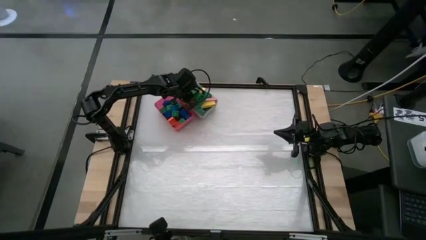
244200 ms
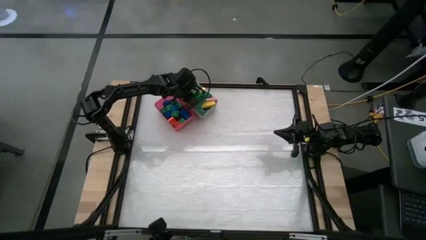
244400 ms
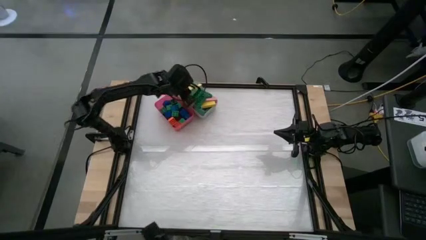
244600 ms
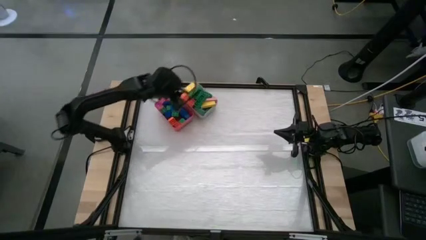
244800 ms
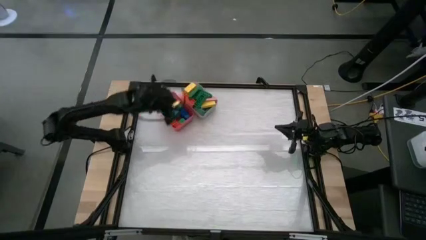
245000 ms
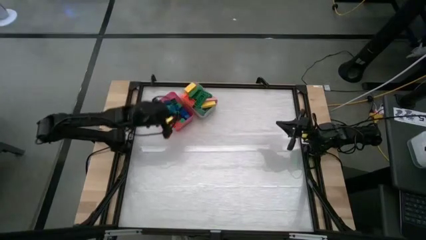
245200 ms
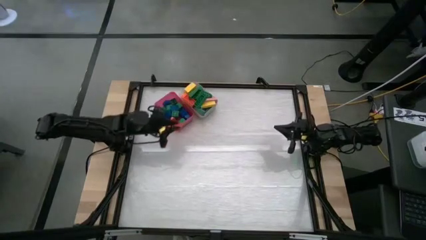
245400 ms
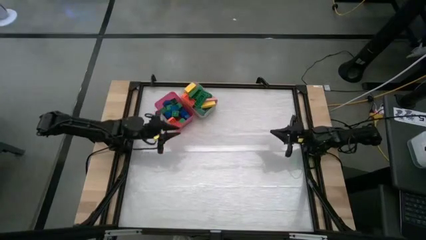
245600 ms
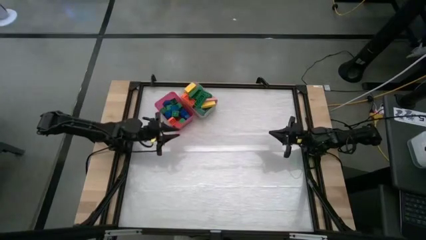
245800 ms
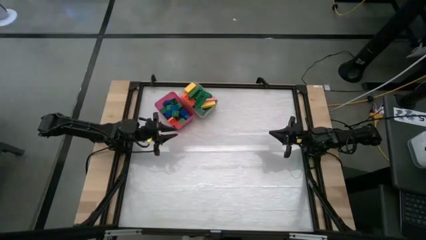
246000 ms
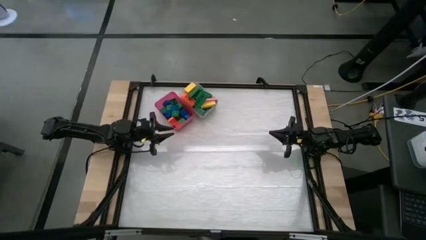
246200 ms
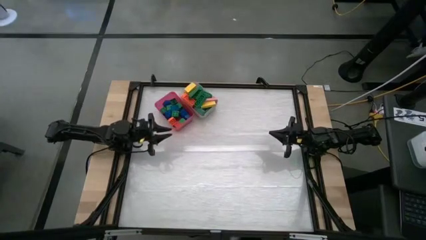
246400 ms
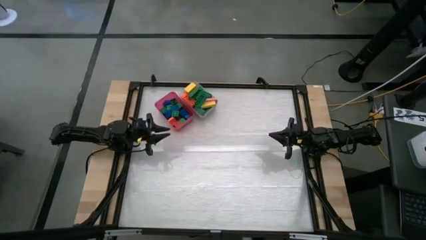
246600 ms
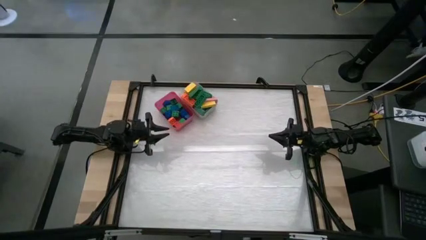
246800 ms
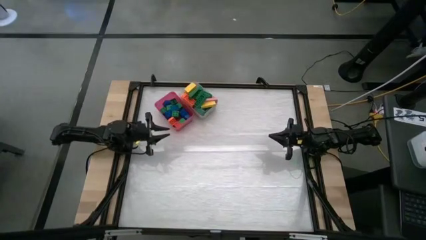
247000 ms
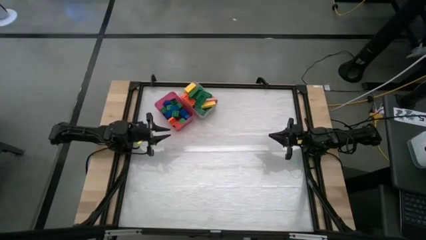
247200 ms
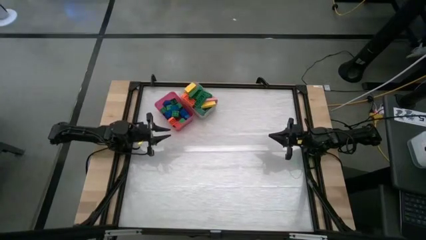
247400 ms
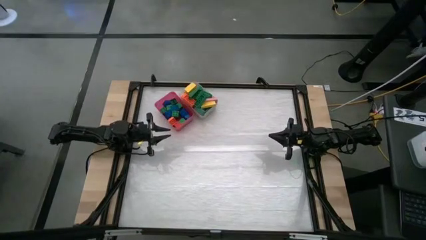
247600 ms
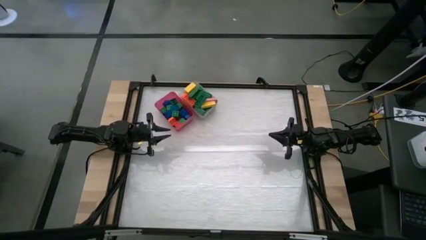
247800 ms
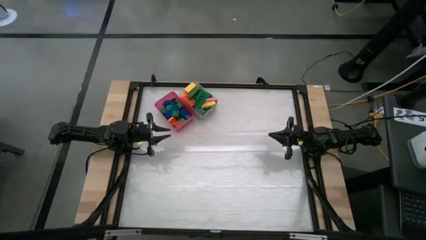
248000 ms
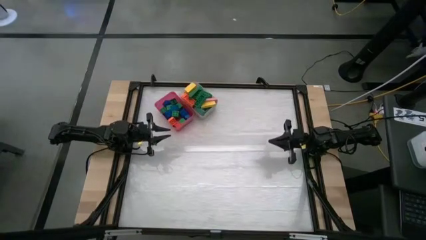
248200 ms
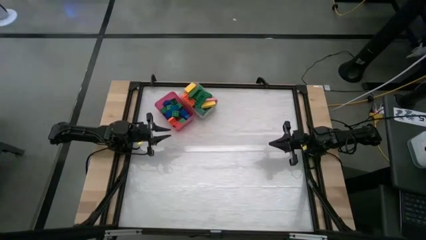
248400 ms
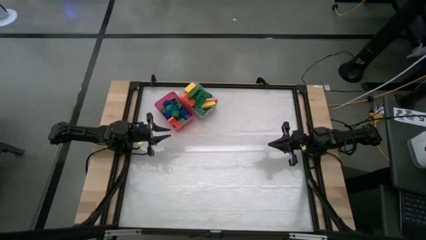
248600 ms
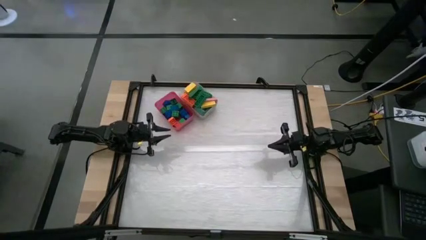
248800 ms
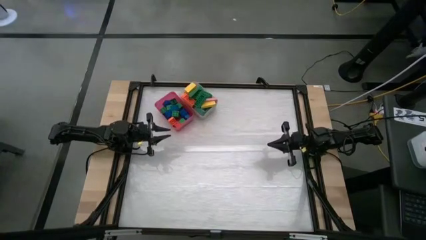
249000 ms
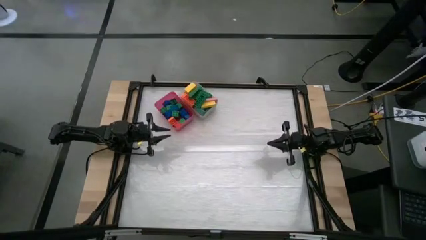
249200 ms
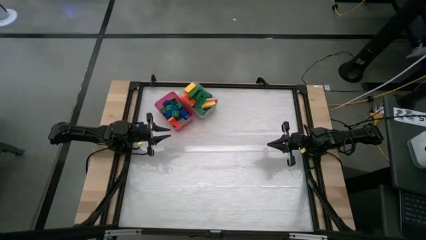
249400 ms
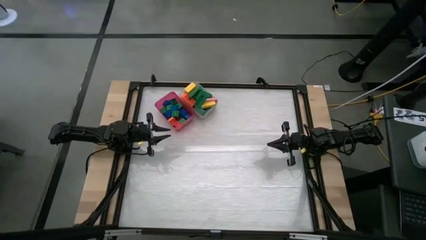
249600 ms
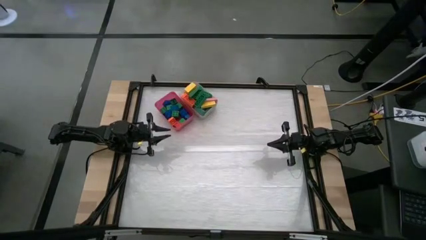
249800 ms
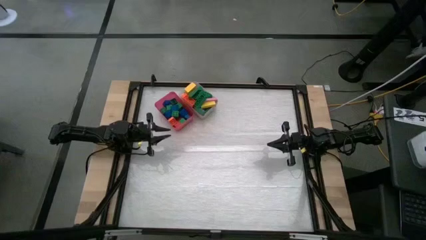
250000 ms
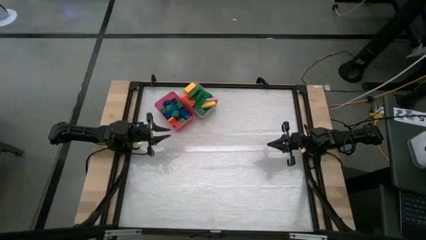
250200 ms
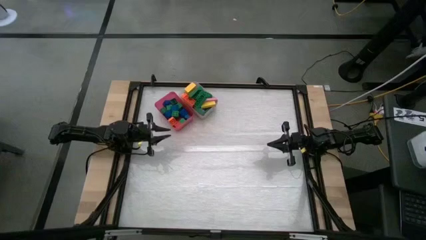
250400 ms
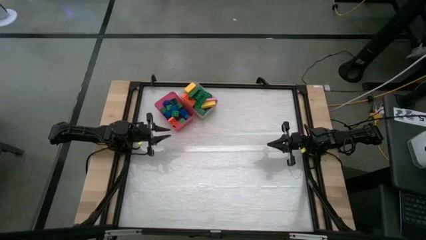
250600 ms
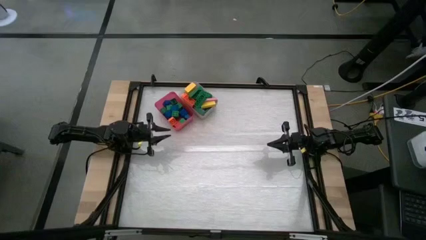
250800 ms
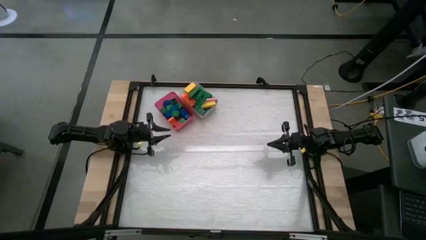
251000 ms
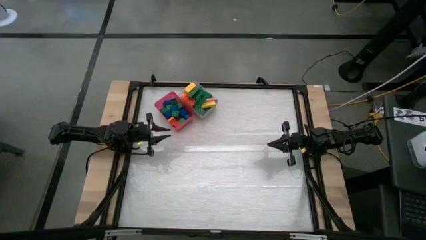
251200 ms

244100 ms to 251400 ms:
Task: Sort blocks by size
Return to Home Position

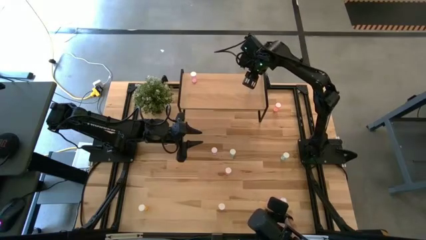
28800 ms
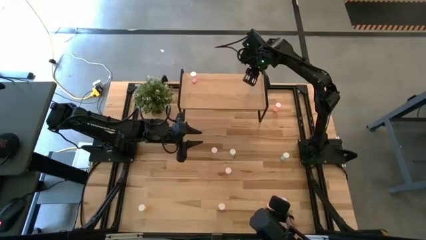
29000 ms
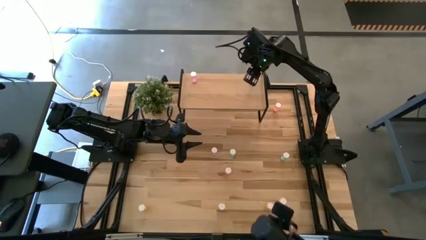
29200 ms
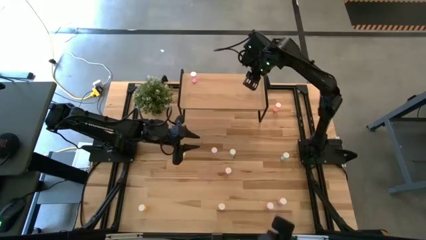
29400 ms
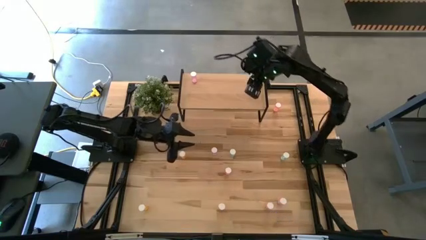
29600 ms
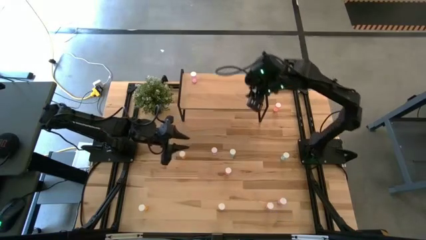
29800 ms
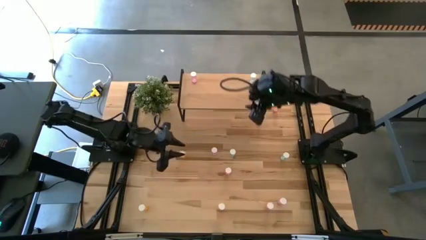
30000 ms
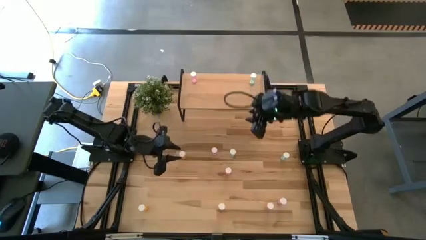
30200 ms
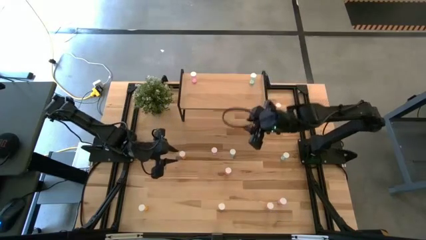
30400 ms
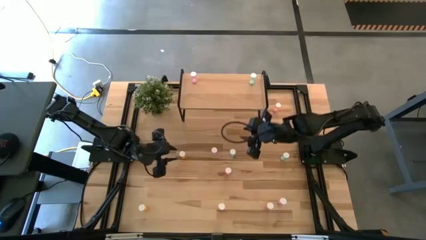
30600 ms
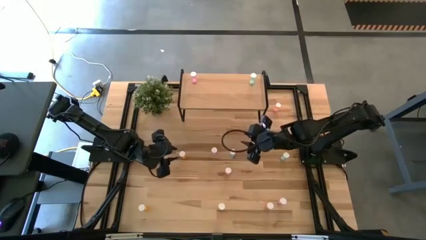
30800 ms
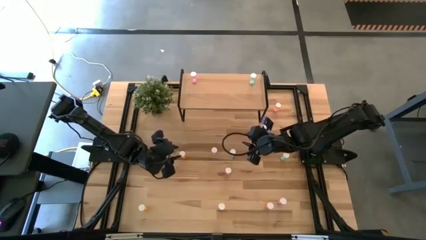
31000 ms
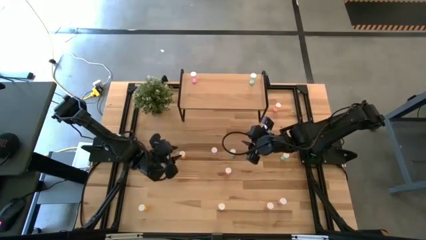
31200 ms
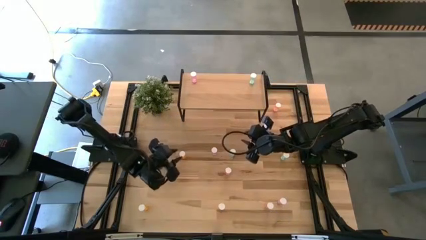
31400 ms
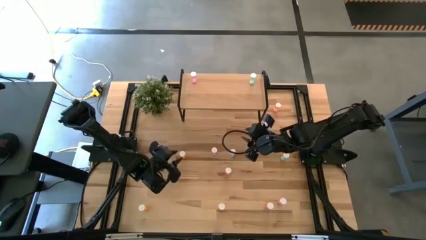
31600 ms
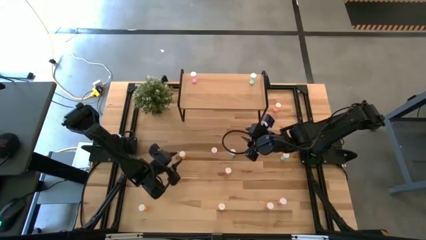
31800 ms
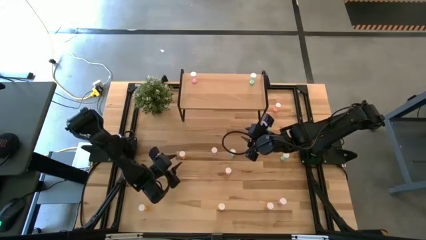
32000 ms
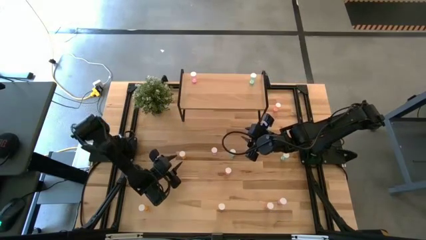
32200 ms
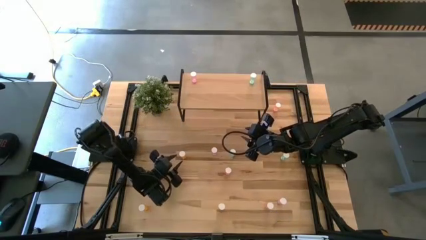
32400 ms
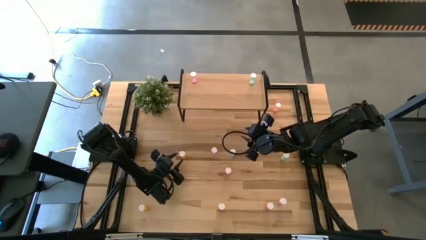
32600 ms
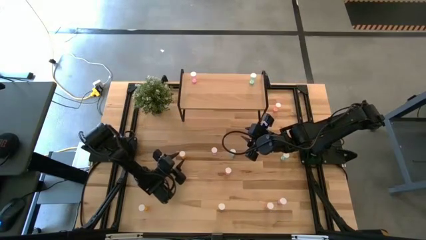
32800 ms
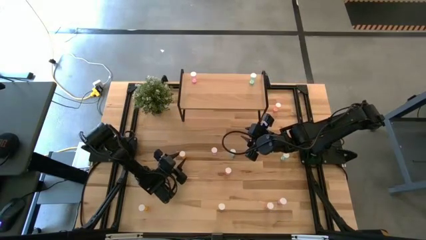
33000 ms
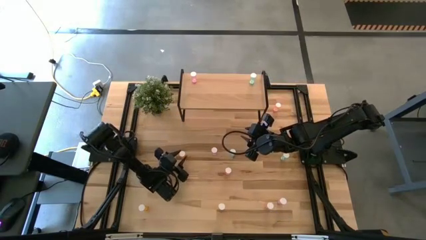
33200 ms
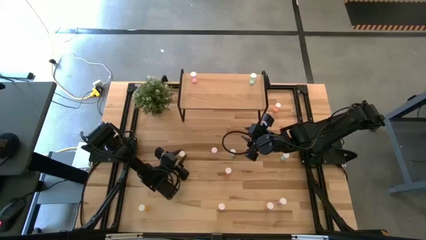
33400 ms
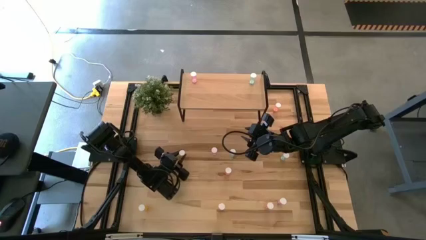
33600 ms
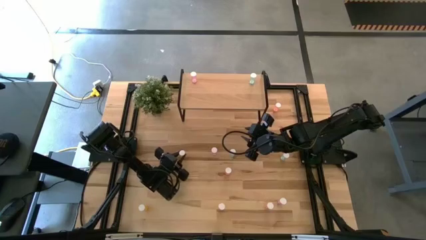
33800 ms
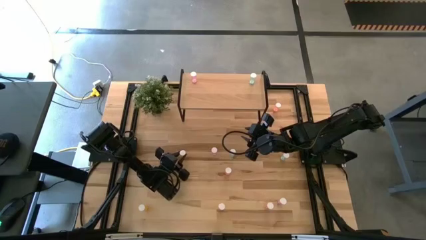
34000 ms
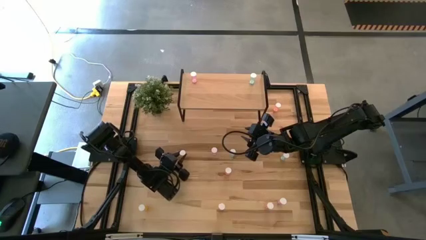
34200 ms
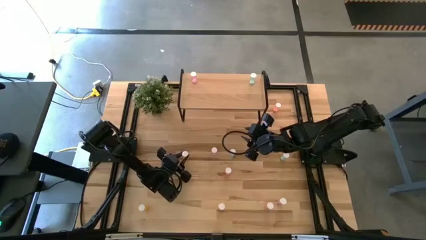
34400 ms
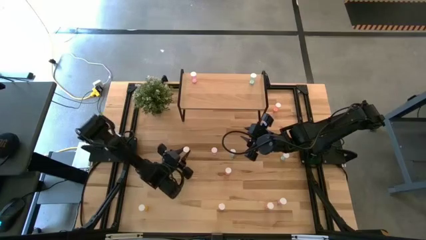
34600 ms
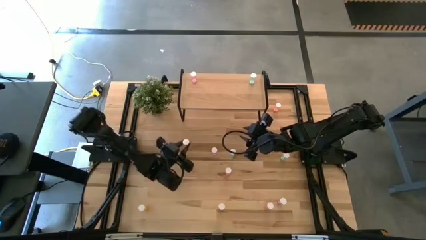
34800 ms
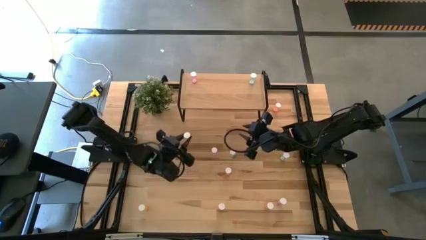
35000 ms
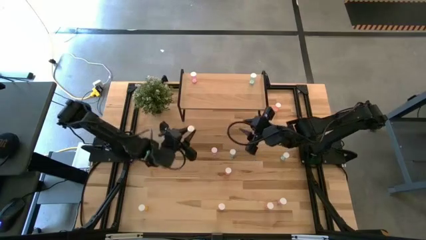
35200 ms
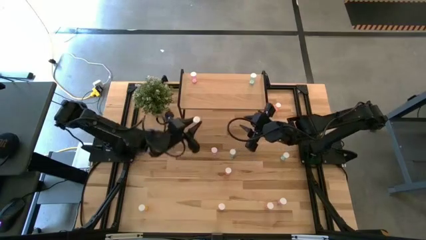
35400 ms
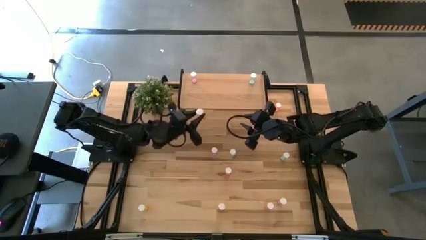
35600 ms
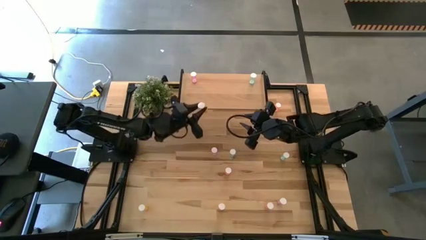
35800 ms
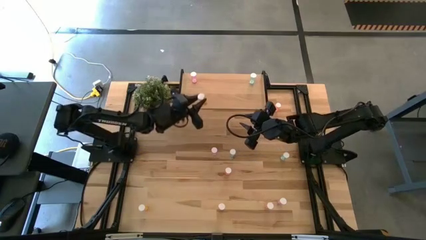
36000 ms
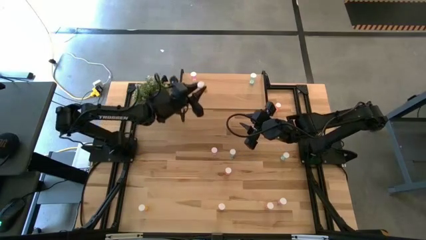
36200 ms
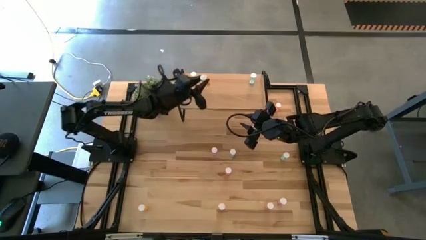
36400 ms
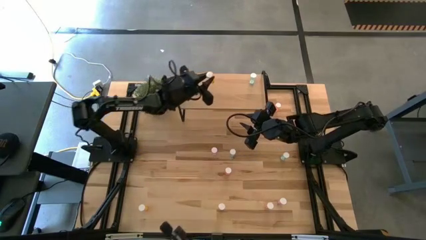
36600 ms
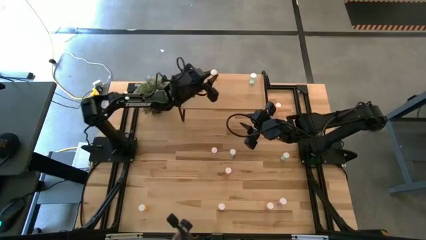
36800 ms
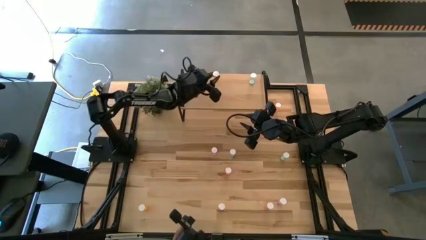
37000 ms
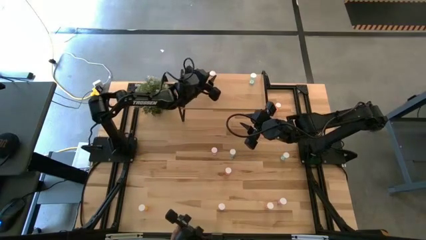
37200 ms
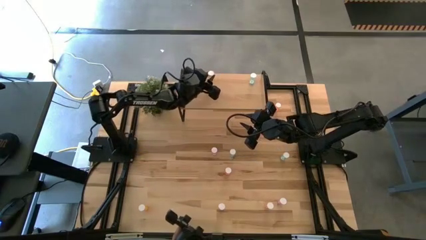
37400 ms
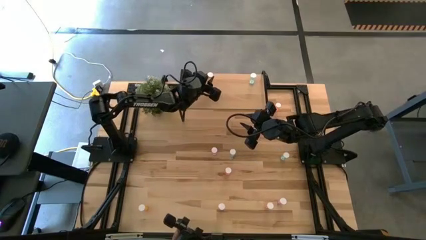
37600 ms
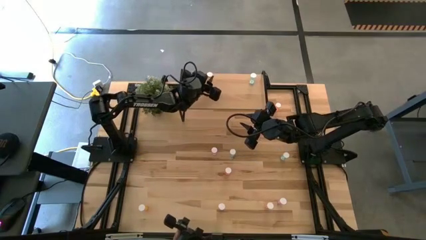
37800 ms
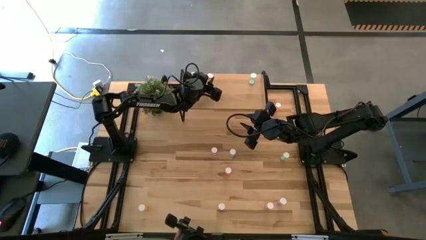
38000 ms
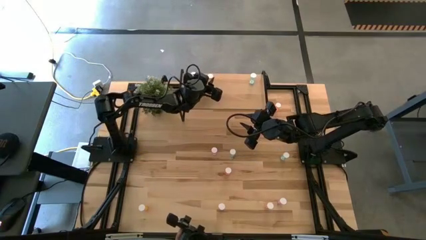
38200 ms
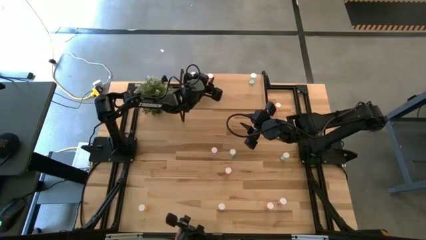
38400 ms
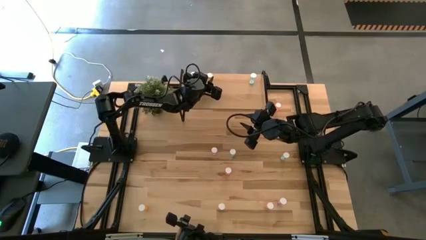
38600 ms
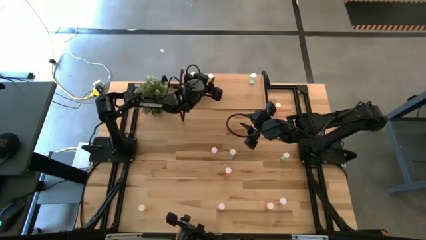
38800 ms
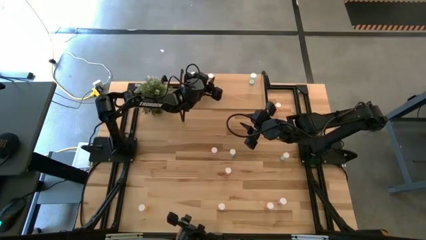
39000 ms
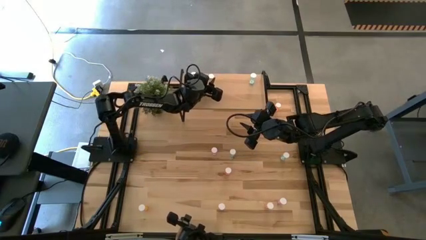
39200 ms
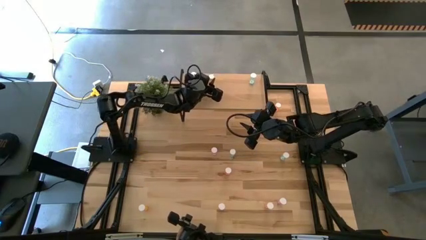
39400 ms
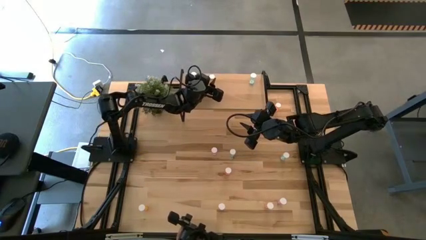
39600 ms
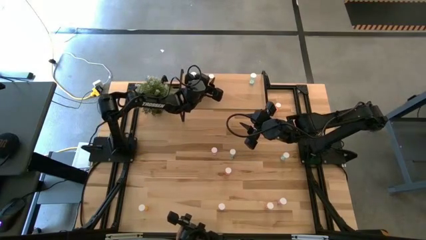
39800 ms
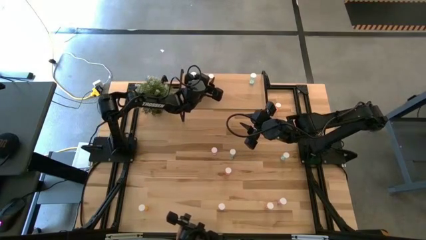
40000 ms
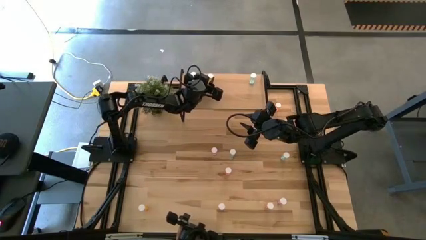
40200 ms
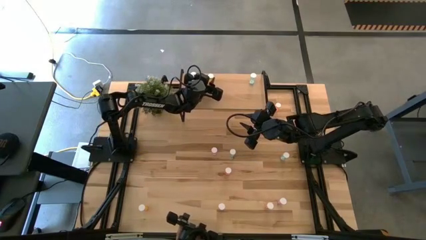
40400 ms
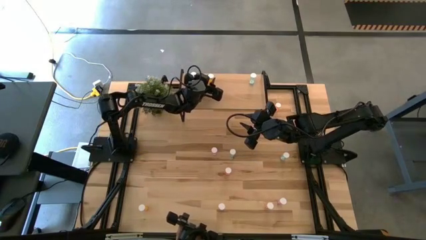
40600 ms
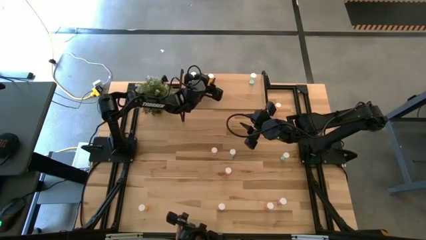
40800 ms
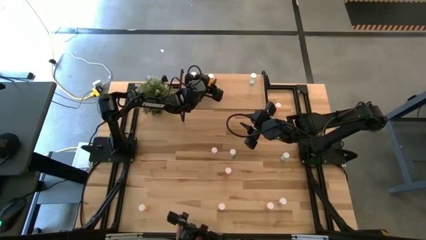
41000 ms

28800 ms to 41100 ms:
Task: Pick and place medicine bottles onto shelf by color
Put the top orange pill bottle on the shelf
